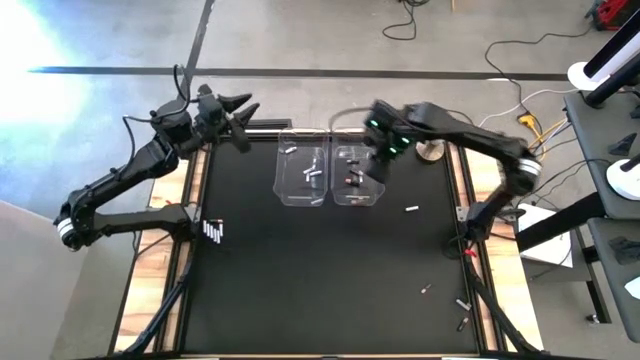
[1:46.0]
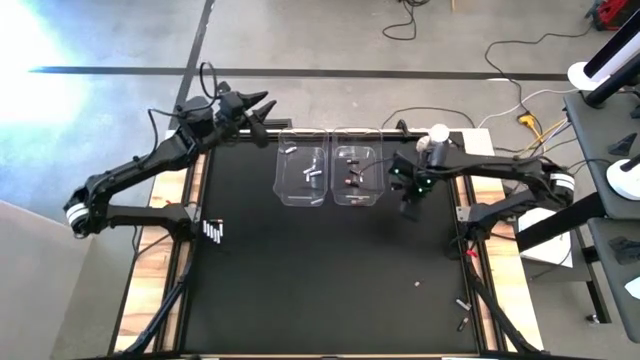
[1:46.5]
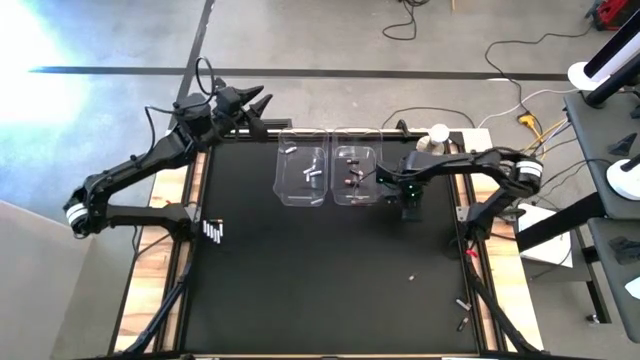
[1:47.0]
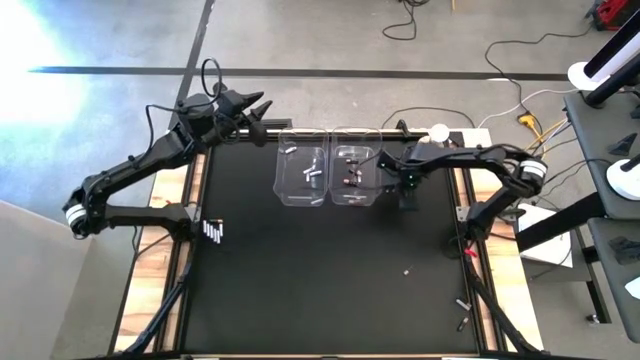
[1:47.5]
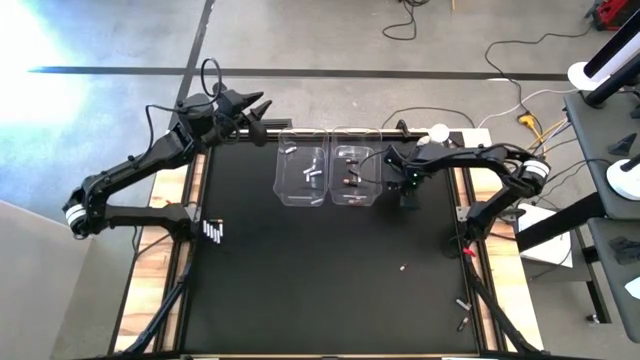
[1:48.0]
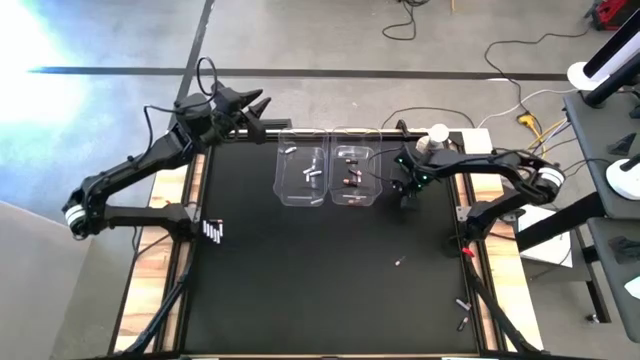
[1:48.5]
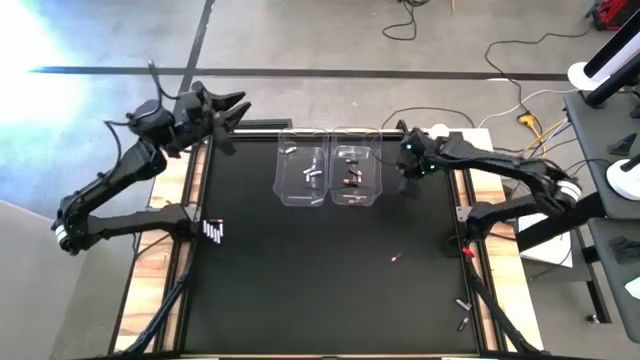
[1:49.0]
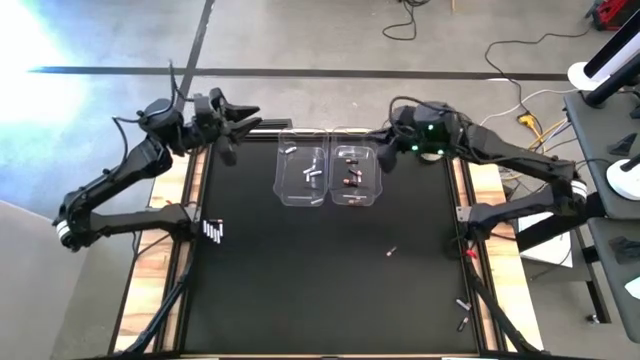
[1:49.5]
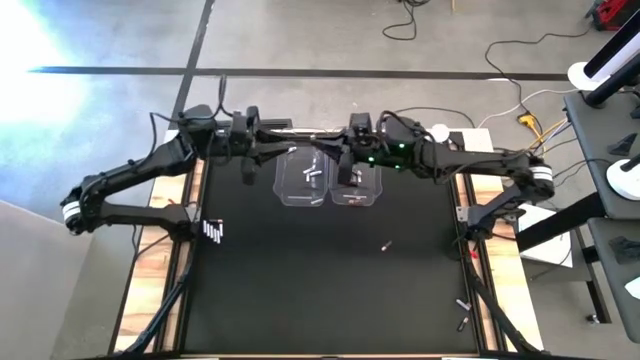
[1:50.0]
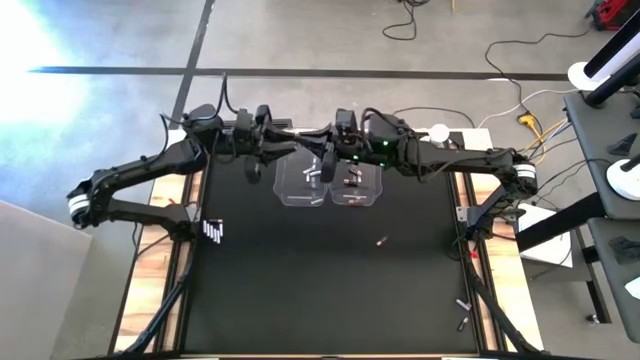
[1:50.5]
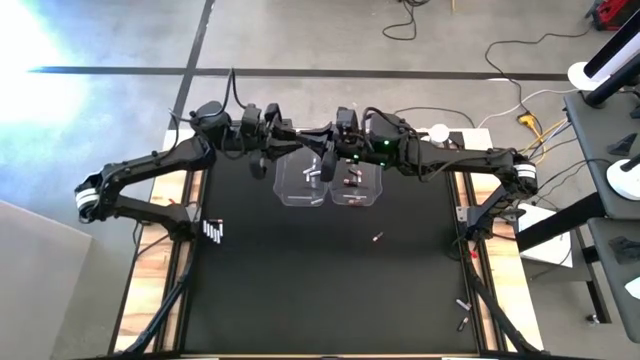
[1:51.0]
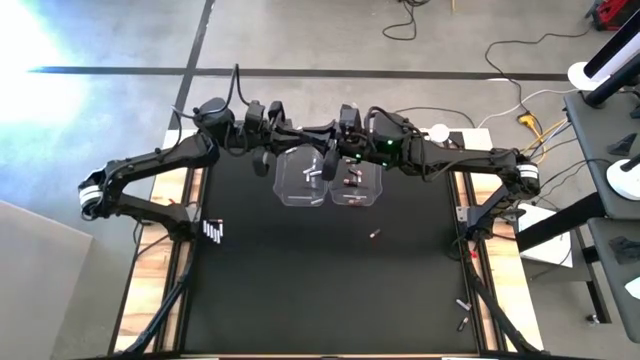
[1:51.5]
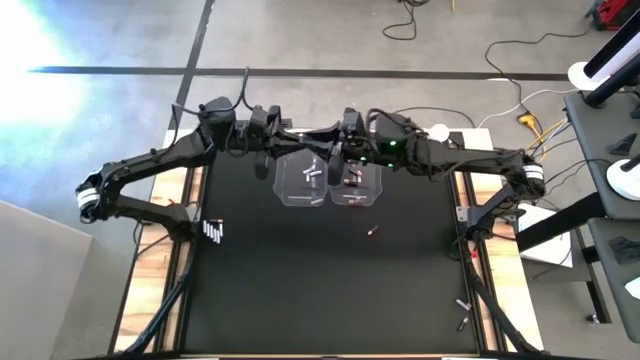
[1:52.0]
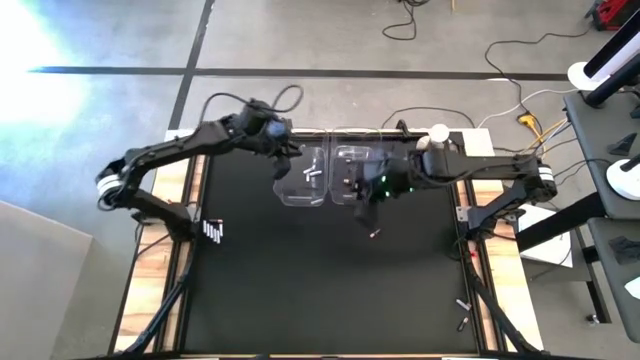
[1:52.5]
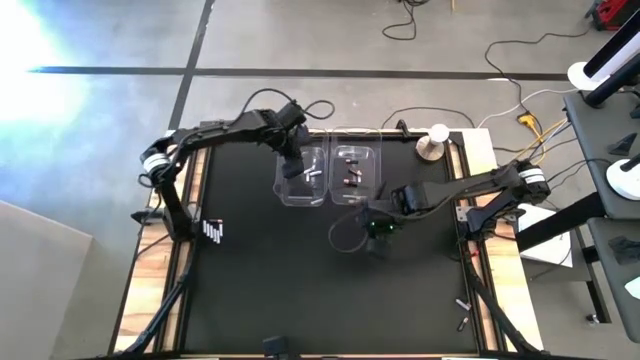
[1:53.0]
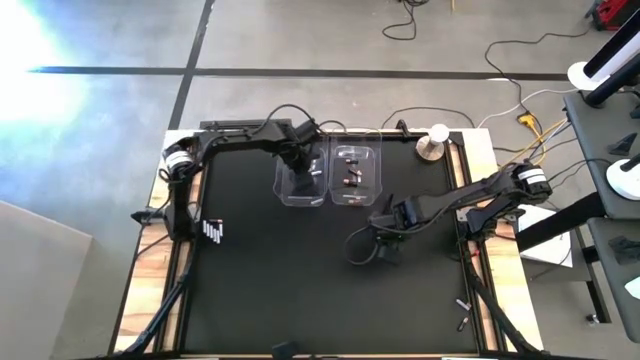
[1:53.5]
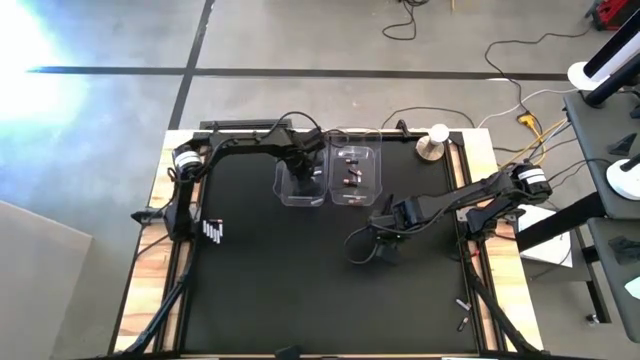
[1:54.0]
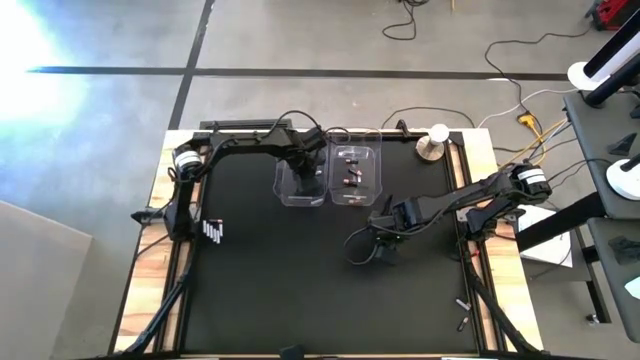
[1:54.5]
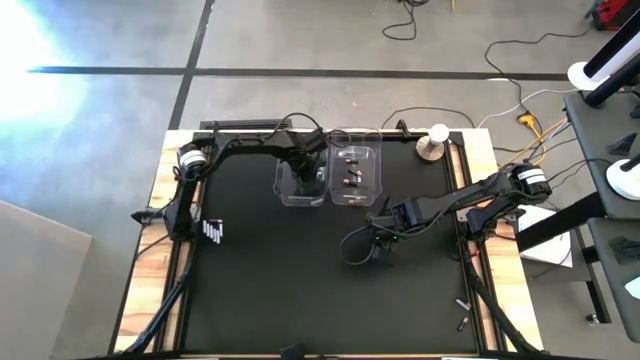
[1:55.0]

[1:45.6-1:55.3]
Task: Sort batteries
Put the white battery into the left transparent bin

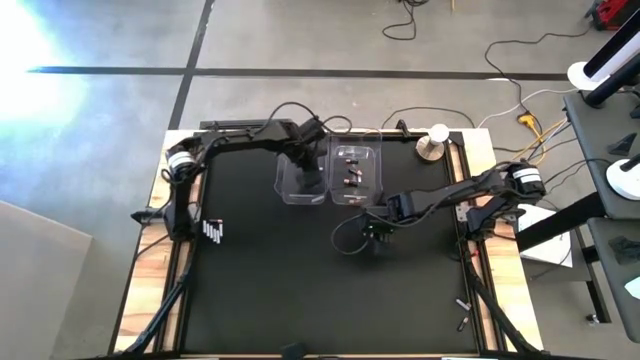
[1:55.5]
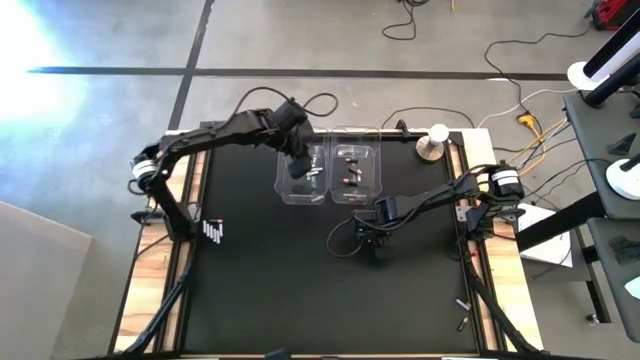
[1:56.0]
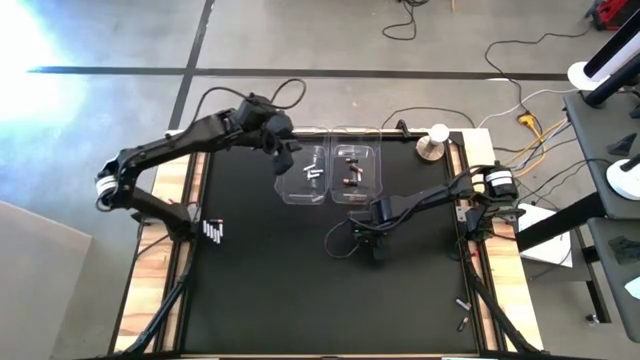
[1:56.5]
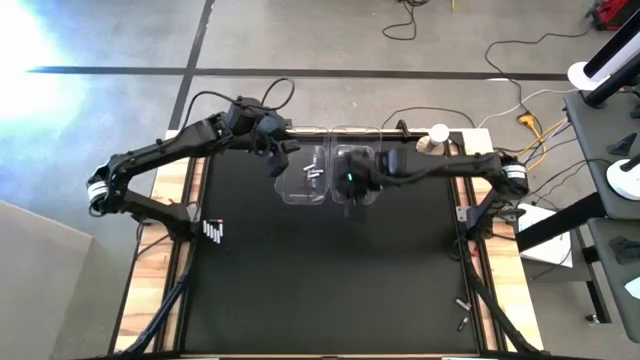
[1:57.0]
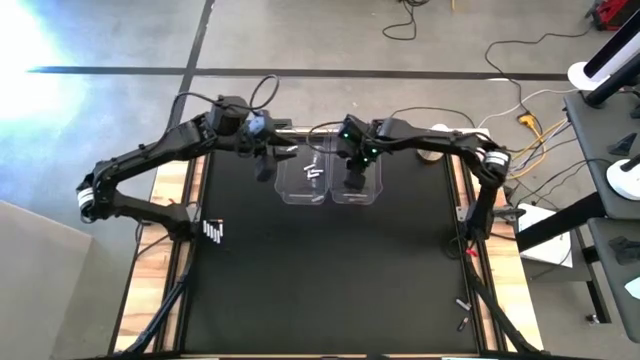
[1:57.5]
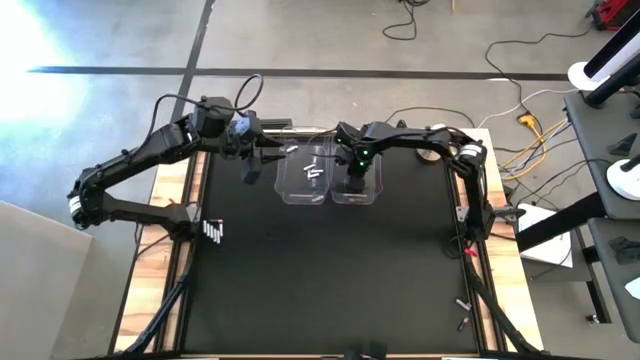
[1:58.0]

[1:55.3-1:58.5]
Put the black battery into the right transparent bin

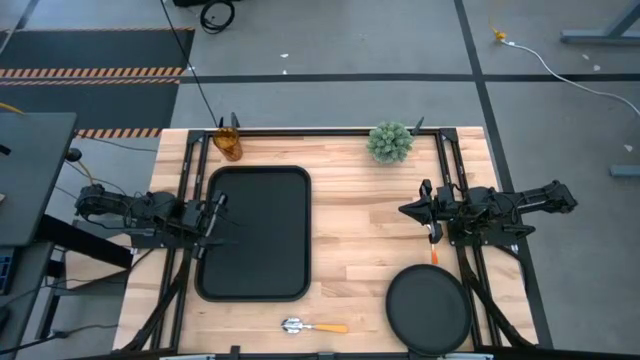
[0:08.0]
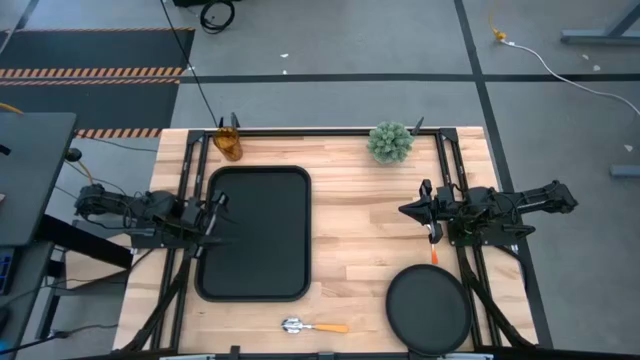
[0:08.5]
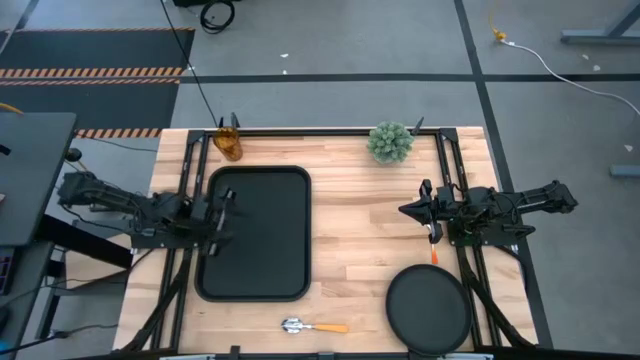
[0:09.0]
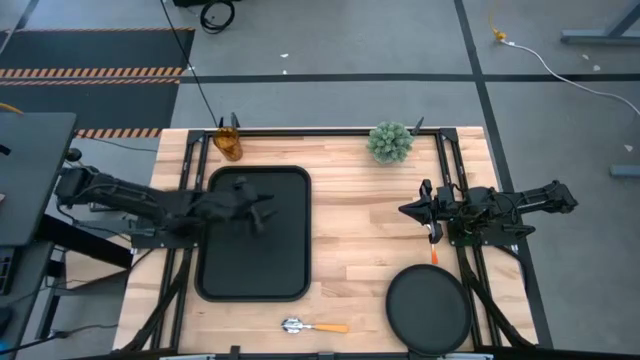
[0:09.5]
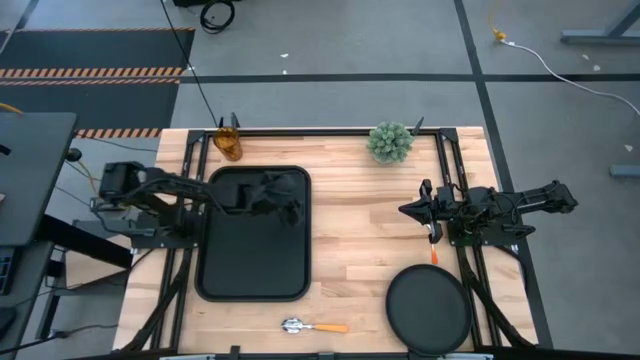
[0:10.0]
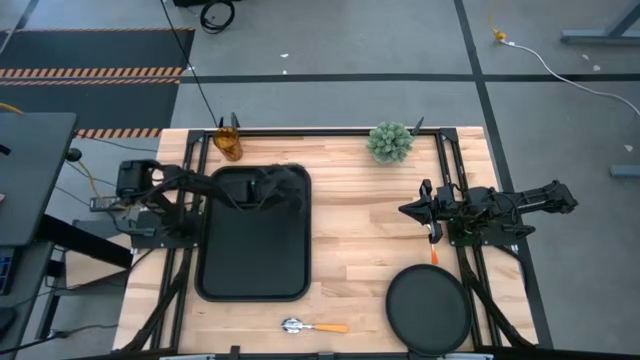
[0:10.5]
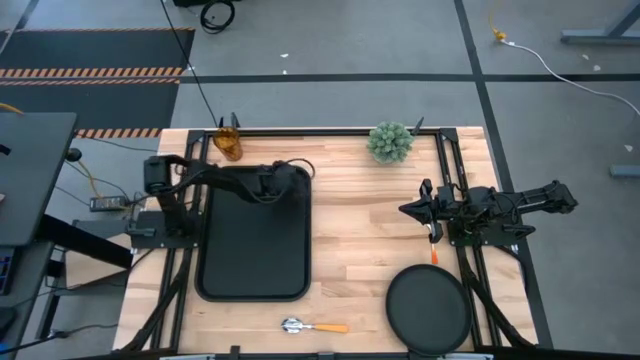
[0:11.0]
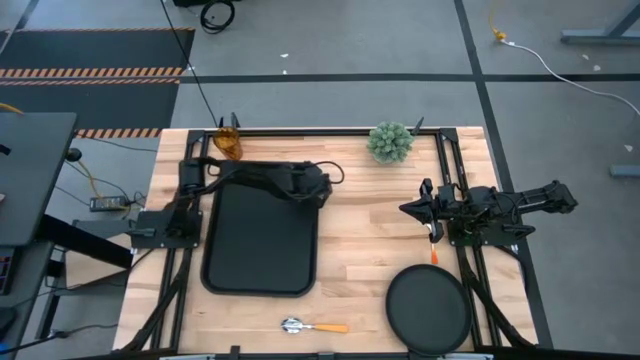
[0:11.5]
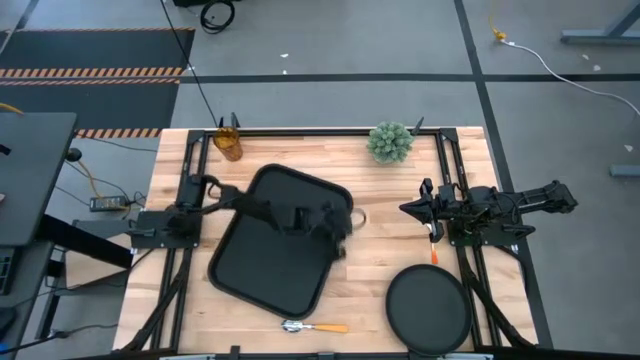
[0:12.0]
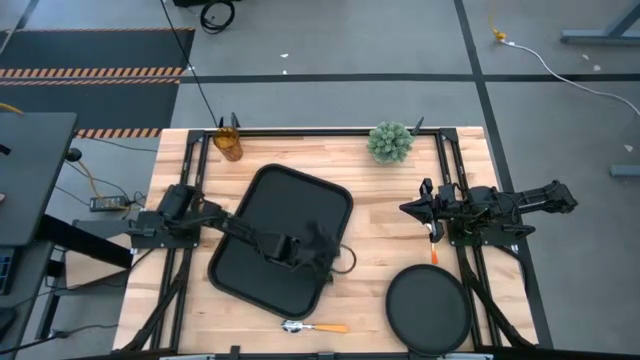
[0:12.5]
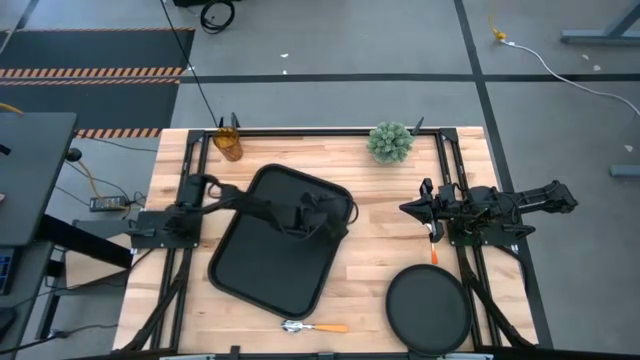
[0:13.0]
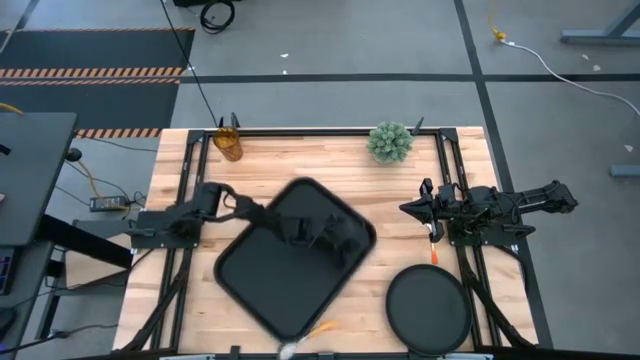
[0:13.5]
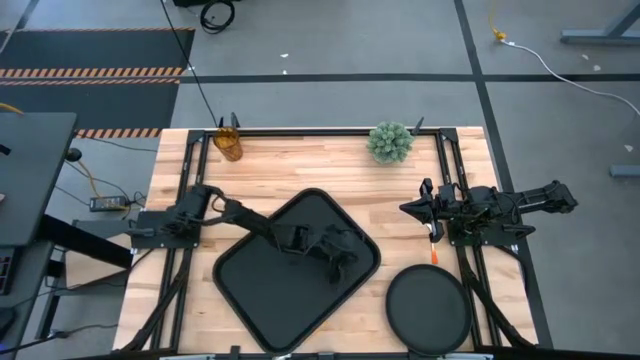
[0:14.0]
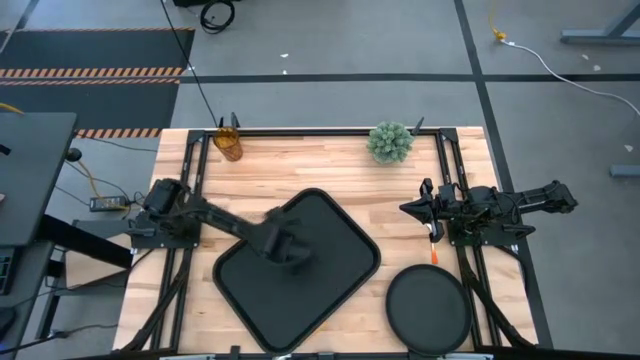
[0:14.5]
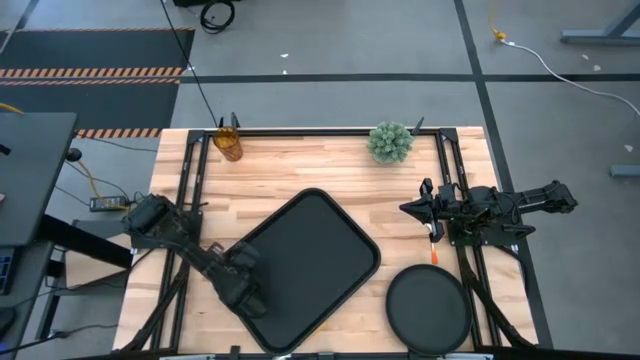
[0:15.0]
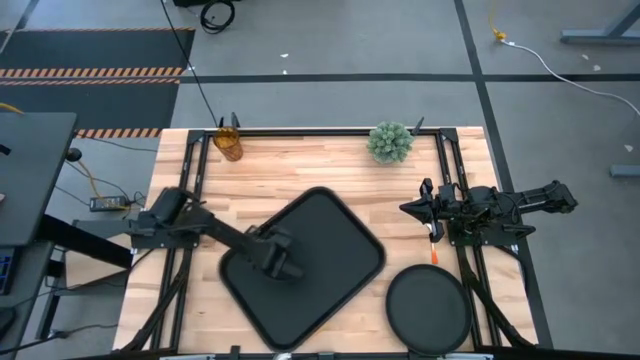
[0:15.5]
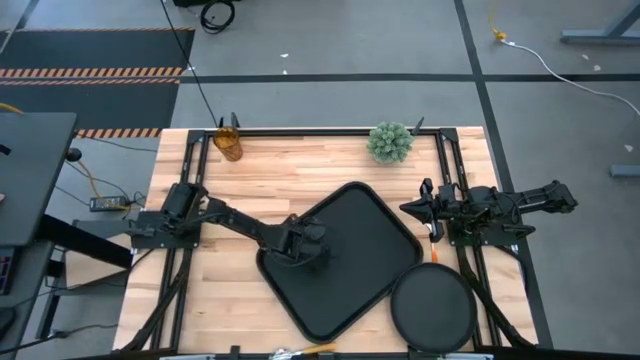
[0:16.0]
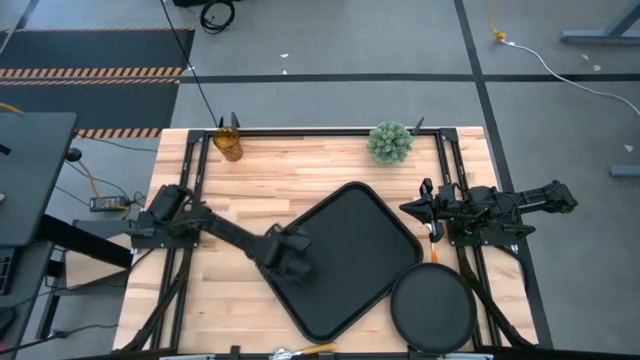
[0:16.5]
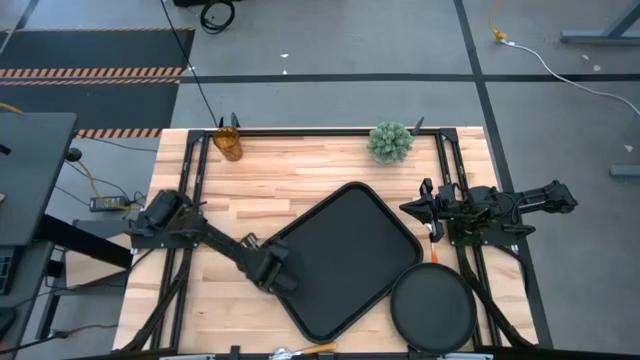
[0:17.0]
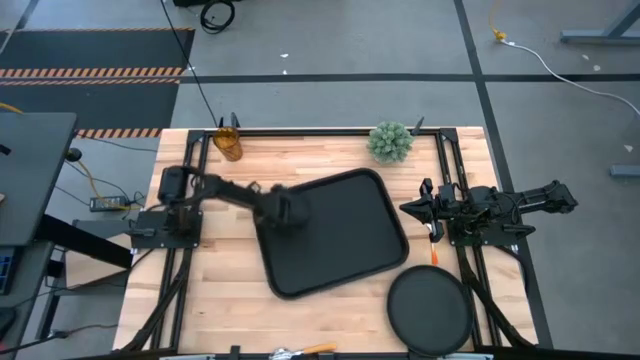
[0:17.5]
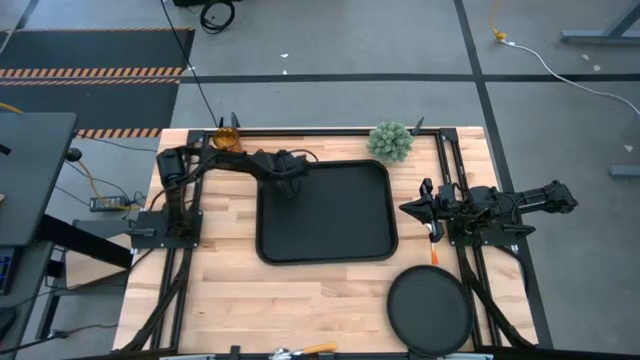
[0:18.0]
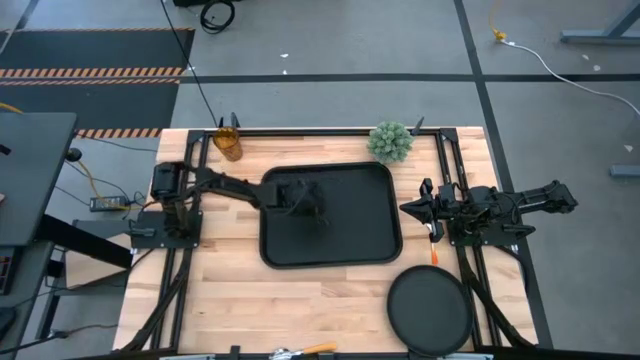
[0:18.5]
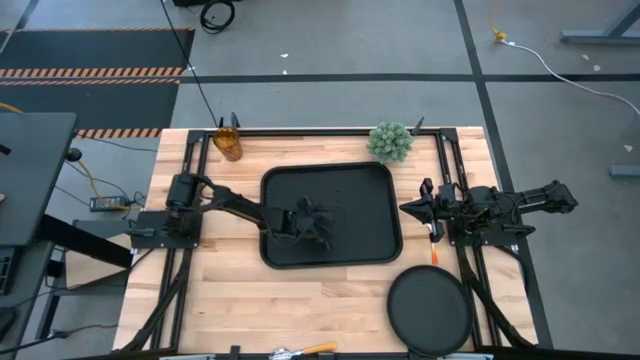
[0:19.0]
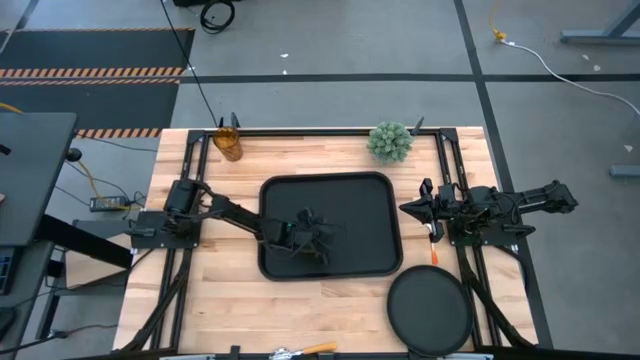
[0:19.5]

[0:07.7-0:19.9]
Task: Pick and place plate/cup/fork/spoon on tray
Prepare the black serving tray on the table
